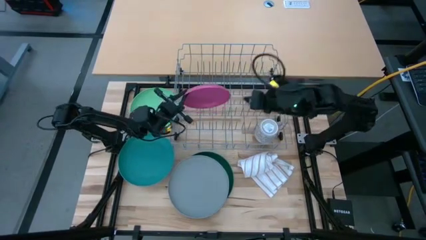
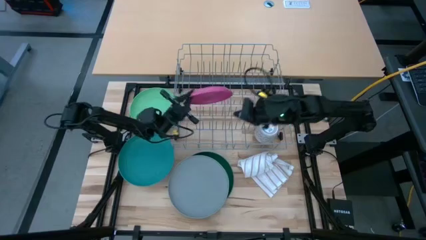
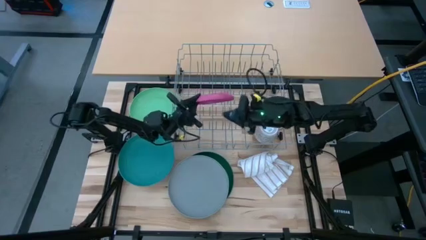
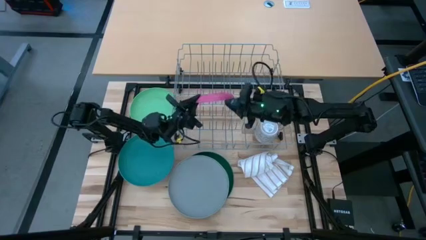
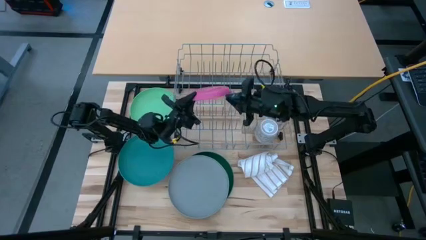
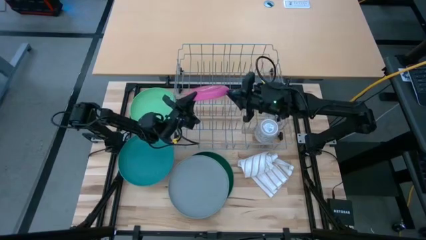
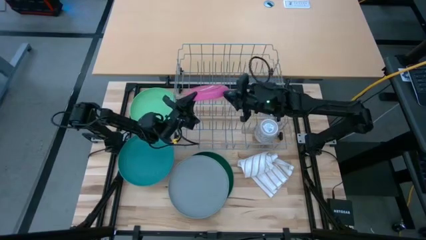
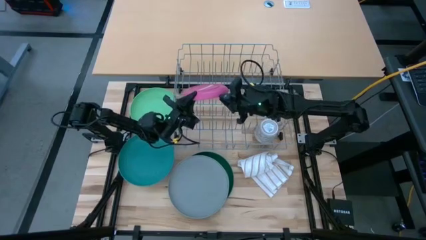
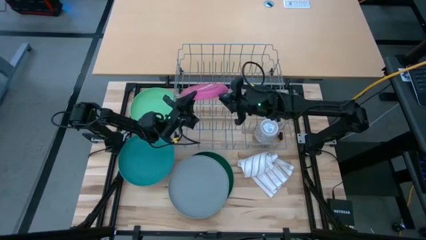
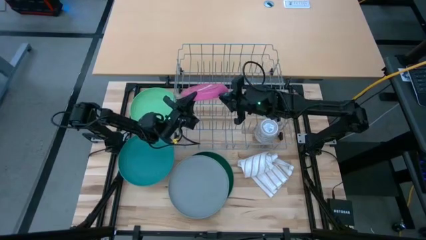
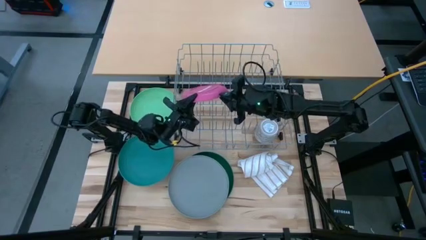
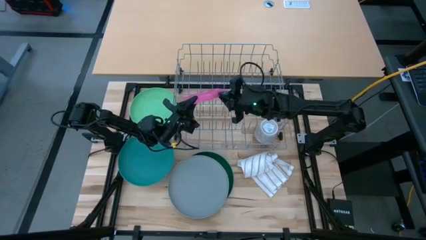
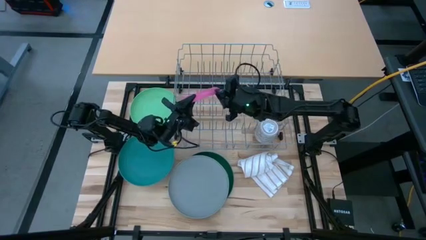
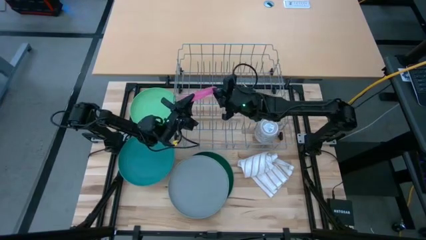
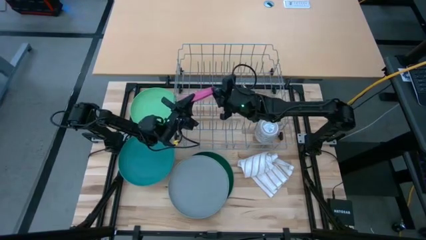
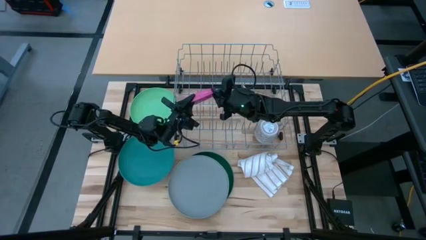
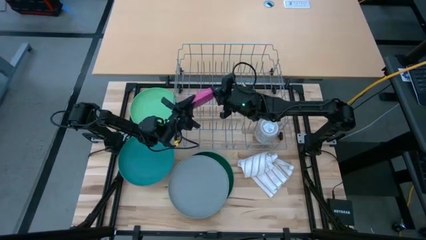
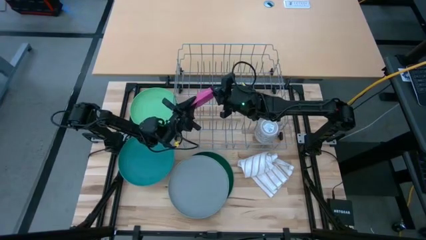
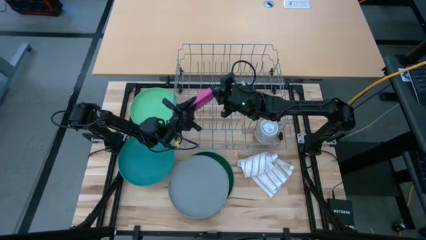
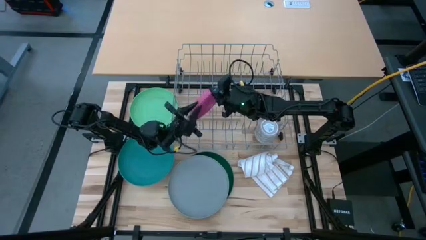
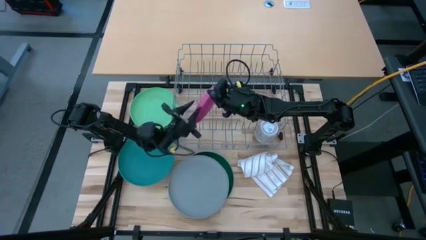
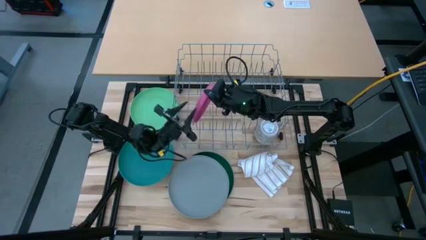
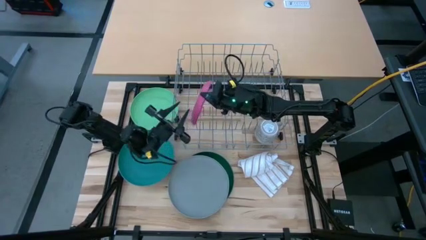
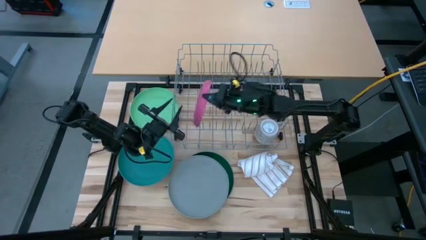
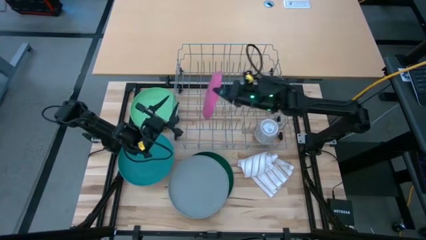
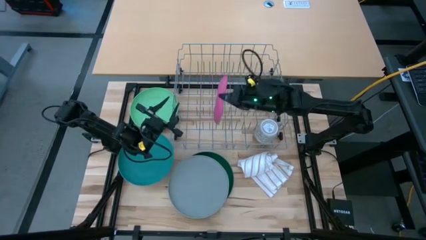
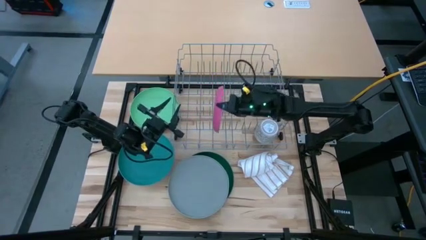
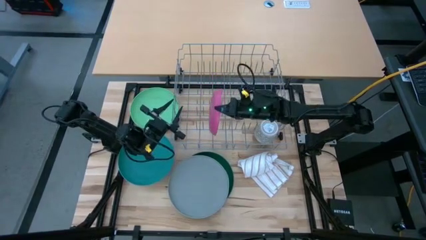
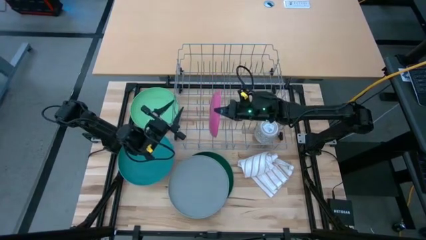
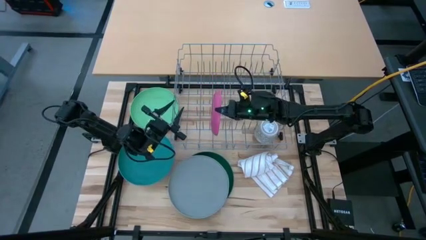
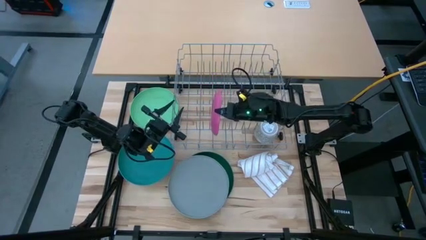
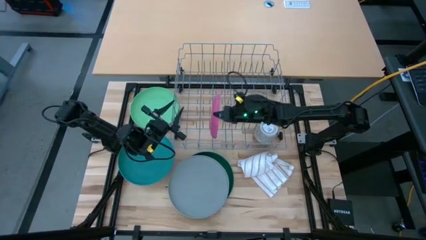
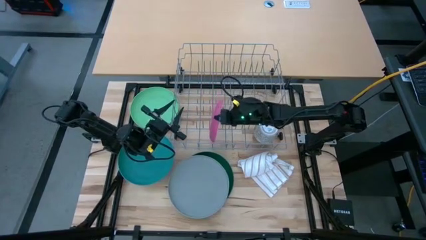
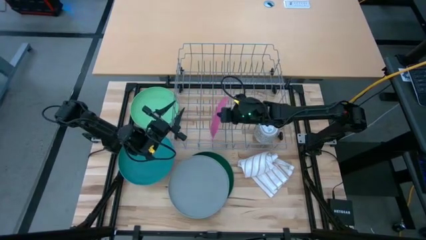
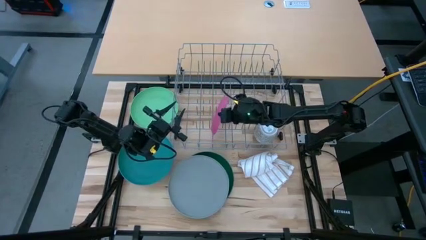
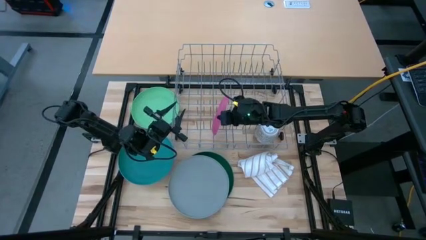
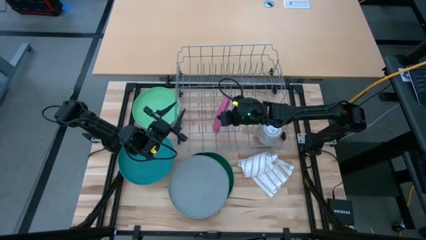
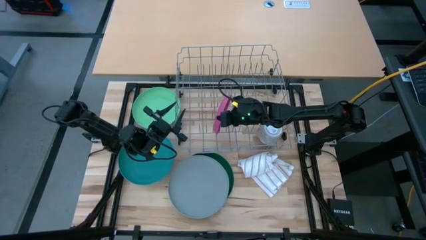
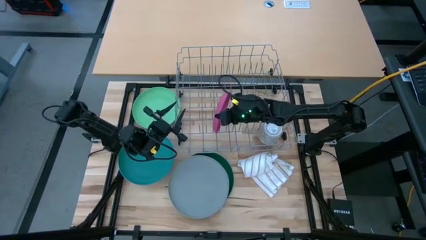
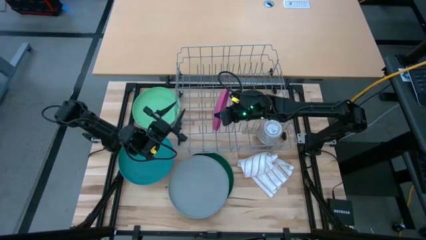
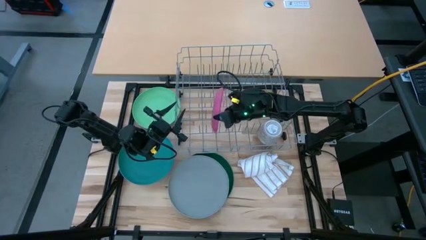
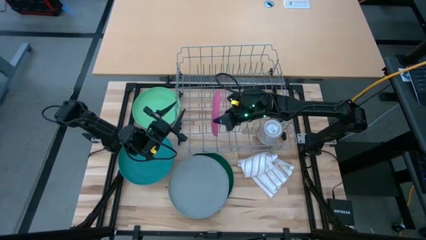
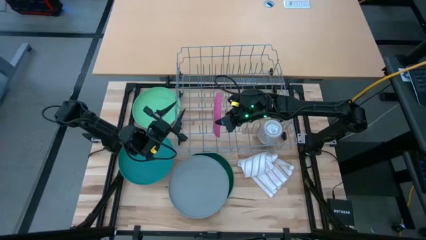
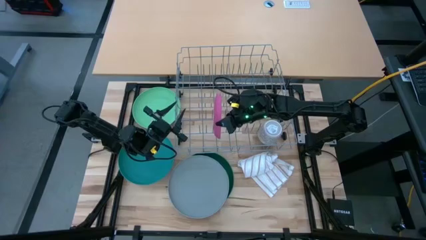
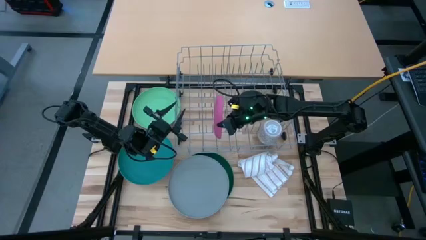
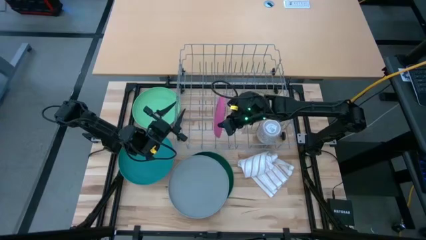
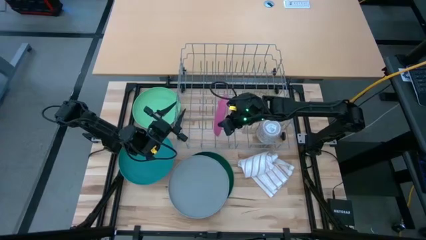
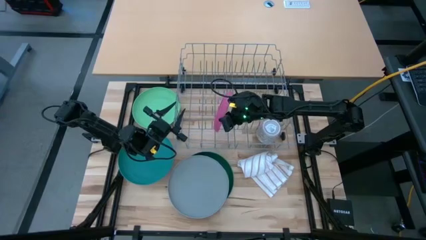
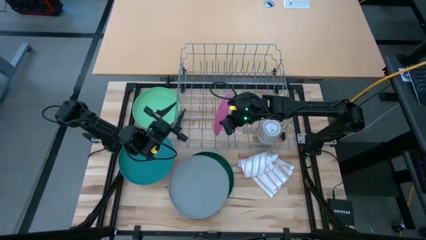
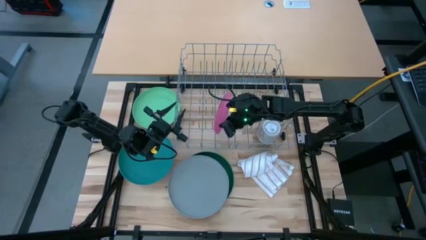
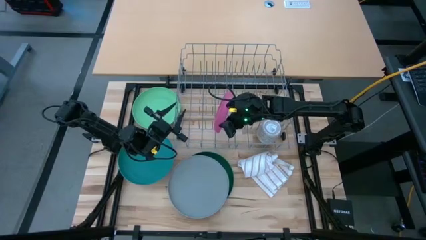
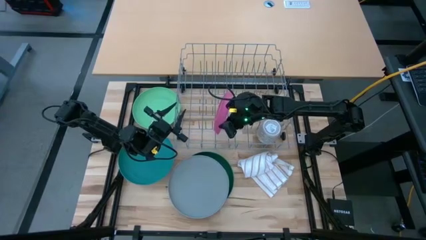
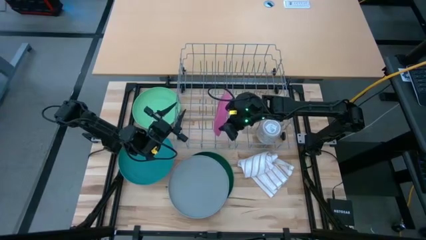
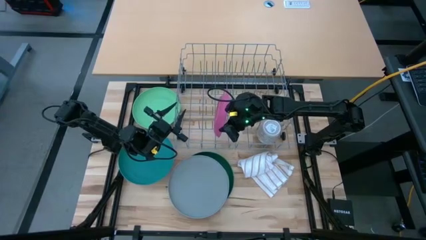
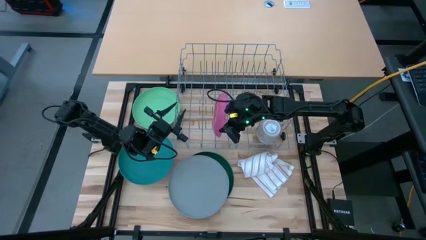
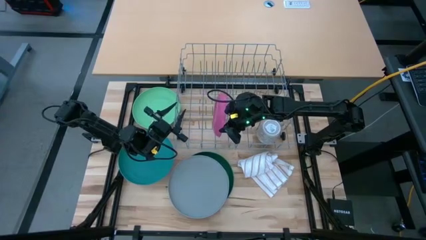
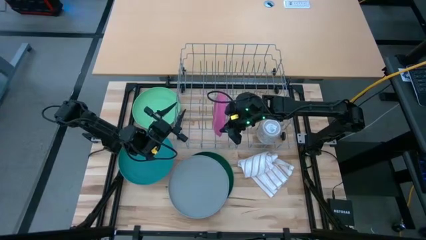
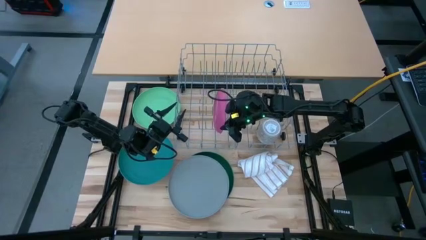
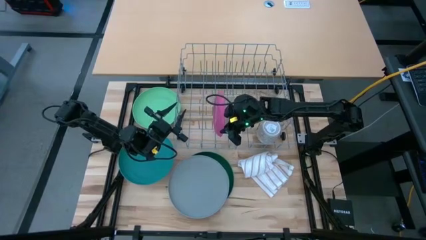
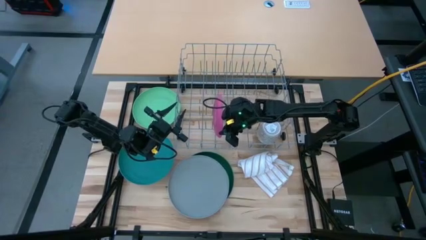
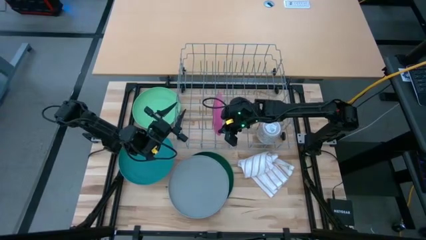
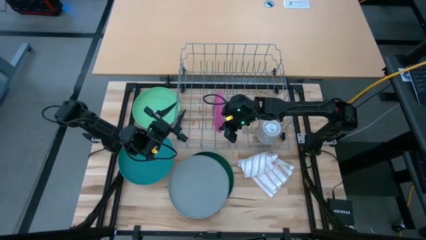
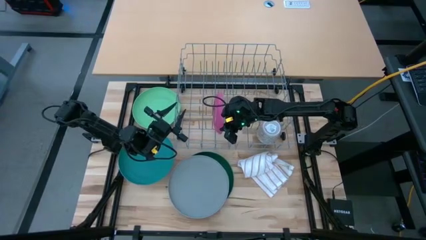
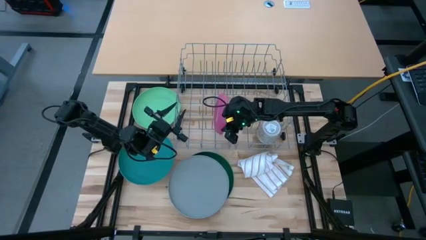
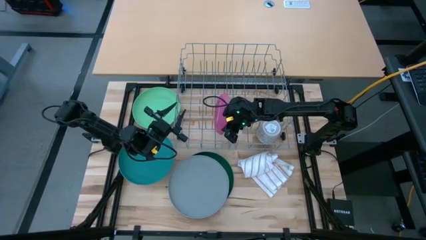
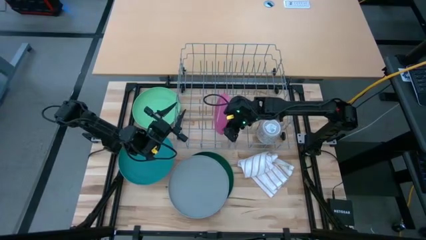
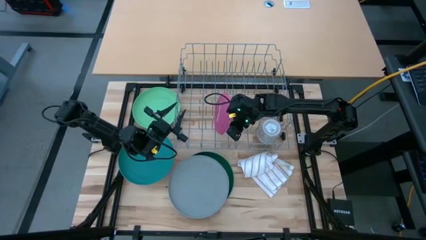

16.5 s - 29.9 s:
Task: Sort dishes
Put the pink plate in the dish rack
